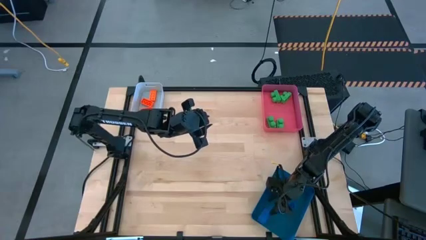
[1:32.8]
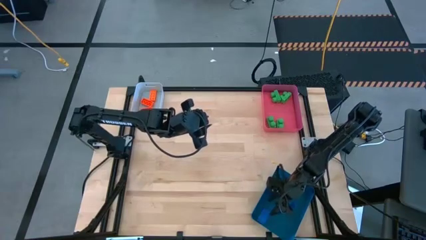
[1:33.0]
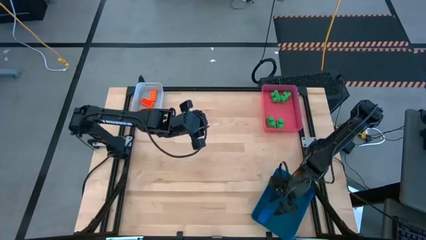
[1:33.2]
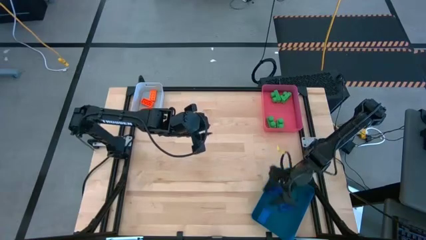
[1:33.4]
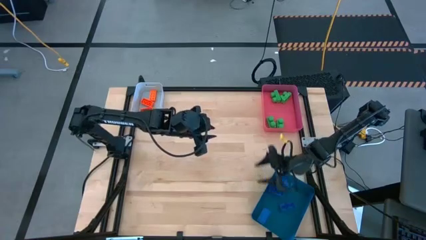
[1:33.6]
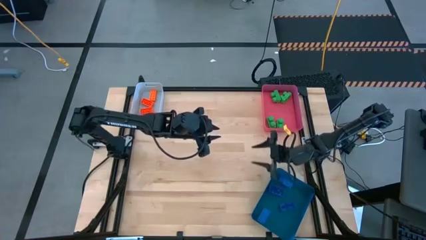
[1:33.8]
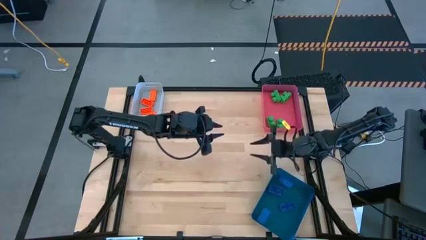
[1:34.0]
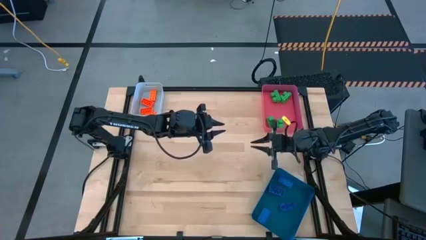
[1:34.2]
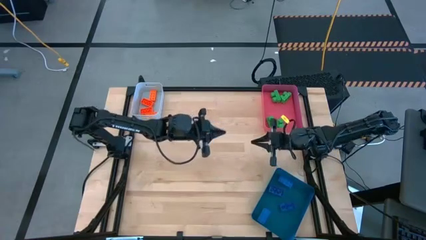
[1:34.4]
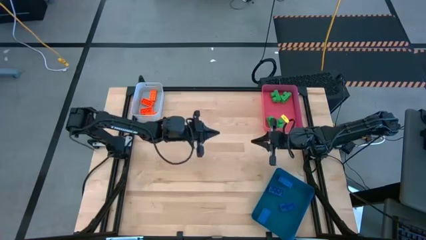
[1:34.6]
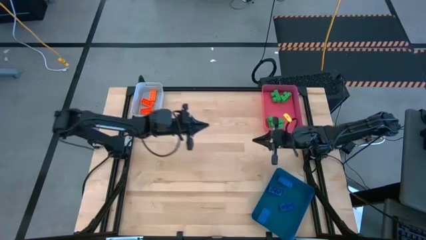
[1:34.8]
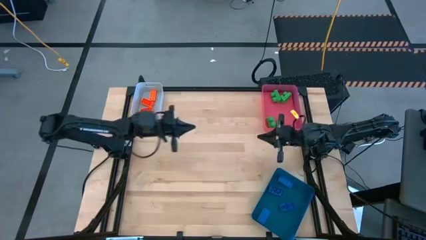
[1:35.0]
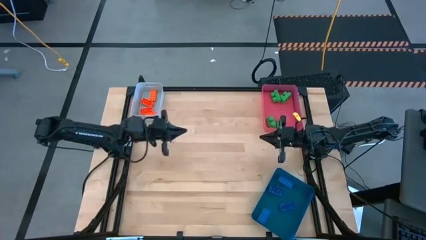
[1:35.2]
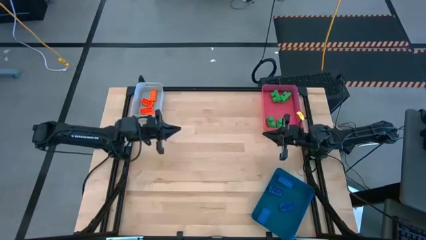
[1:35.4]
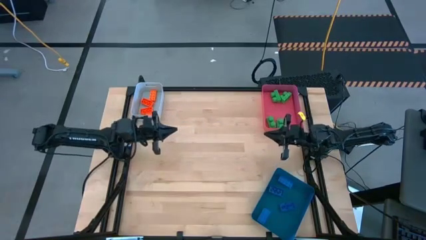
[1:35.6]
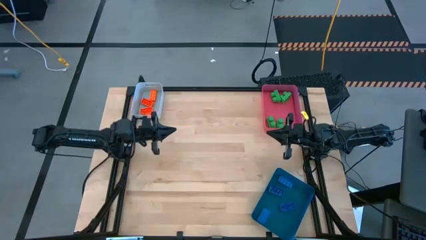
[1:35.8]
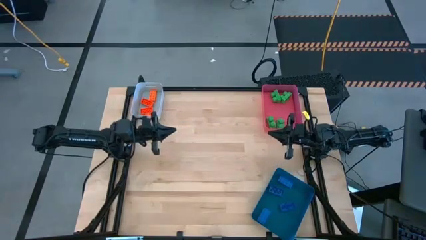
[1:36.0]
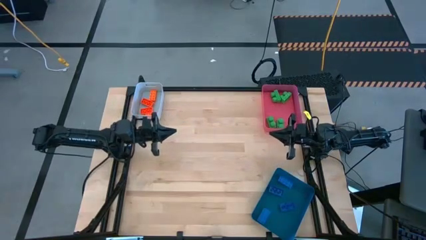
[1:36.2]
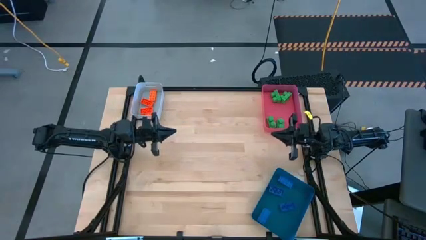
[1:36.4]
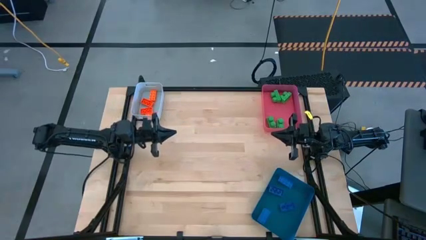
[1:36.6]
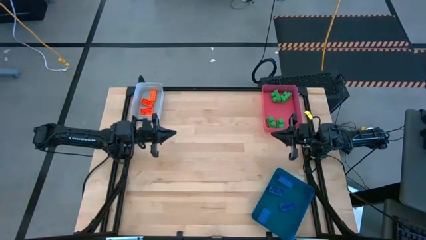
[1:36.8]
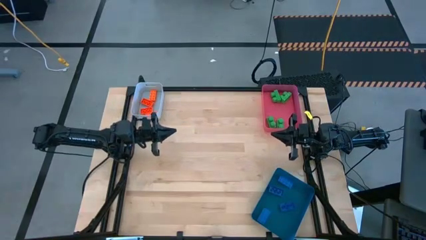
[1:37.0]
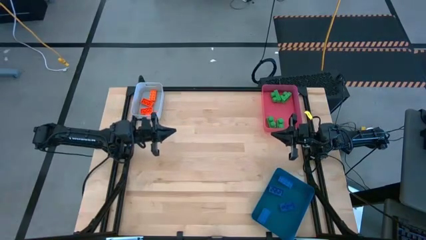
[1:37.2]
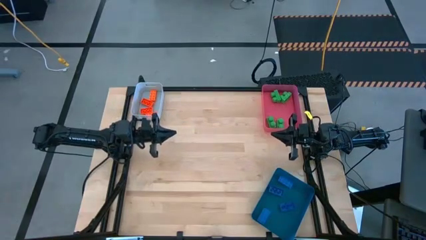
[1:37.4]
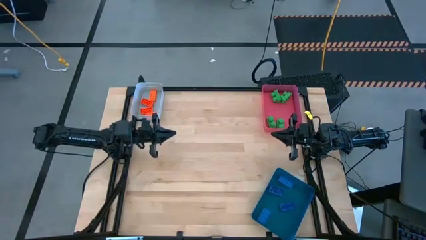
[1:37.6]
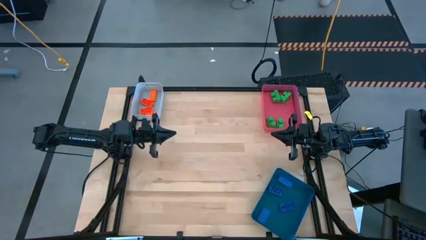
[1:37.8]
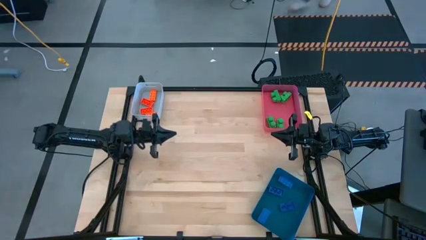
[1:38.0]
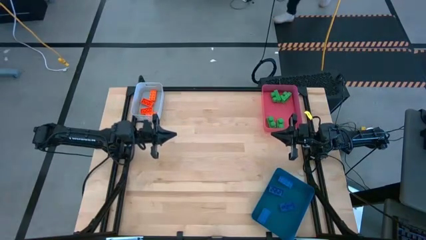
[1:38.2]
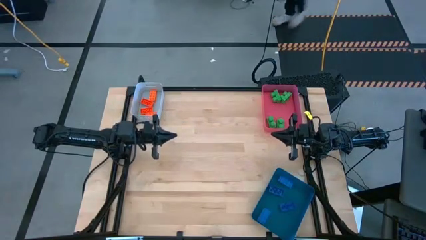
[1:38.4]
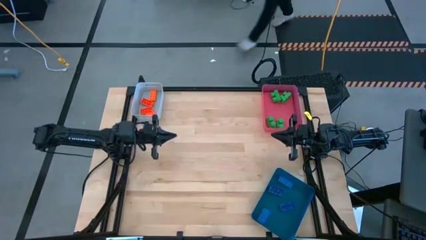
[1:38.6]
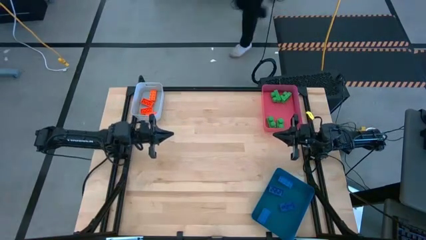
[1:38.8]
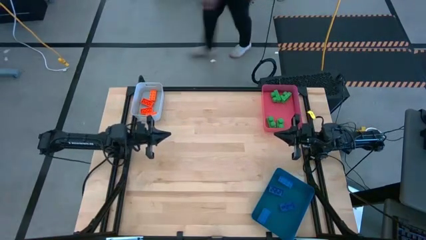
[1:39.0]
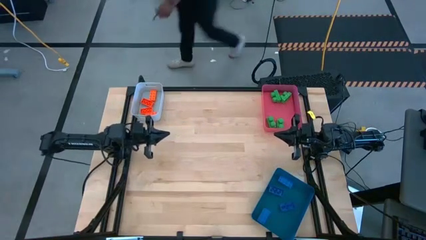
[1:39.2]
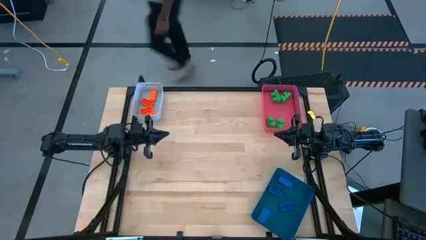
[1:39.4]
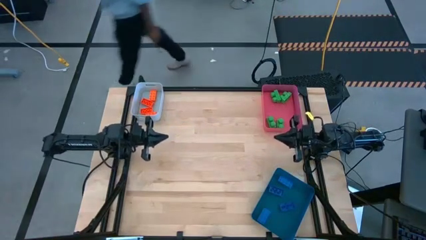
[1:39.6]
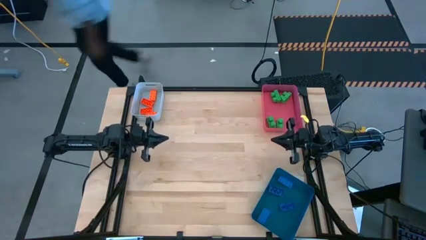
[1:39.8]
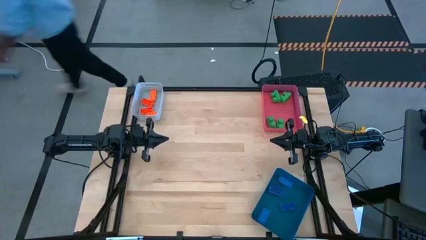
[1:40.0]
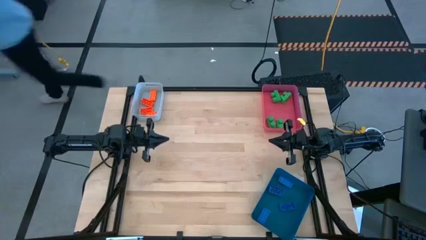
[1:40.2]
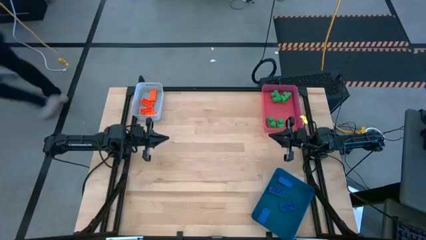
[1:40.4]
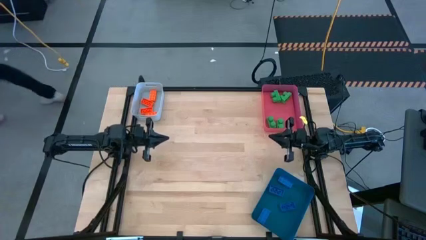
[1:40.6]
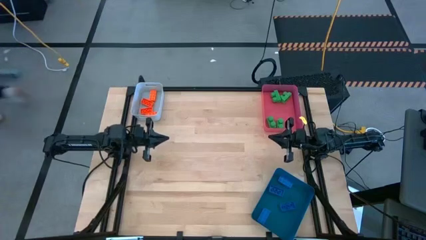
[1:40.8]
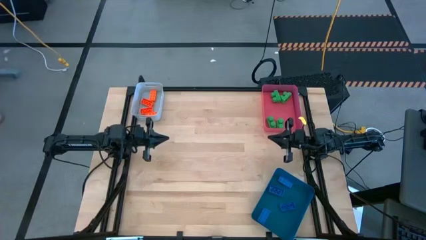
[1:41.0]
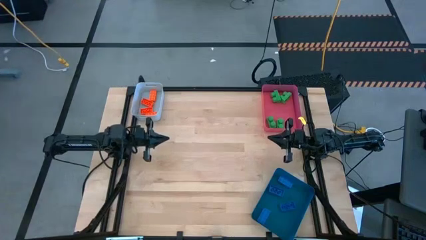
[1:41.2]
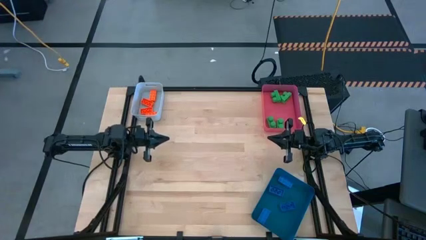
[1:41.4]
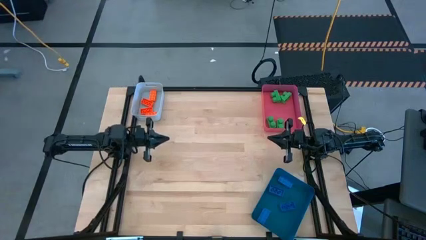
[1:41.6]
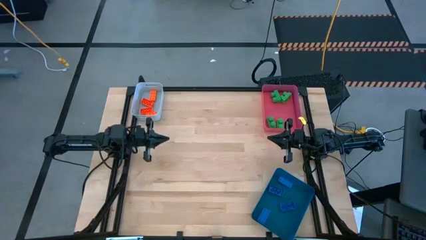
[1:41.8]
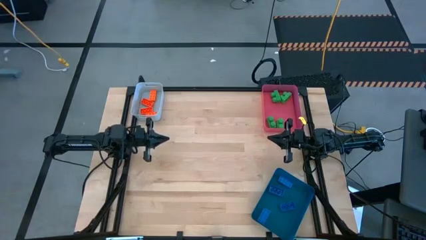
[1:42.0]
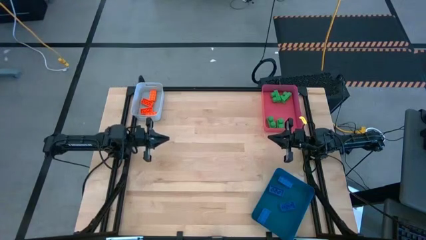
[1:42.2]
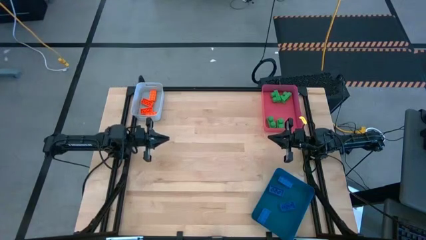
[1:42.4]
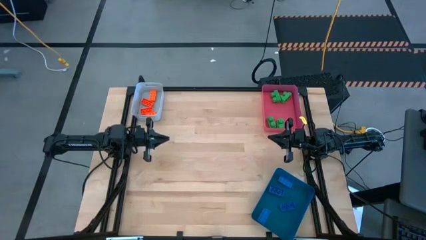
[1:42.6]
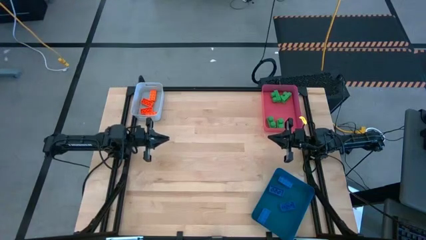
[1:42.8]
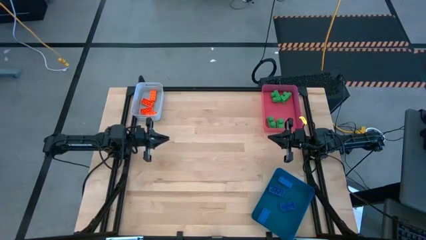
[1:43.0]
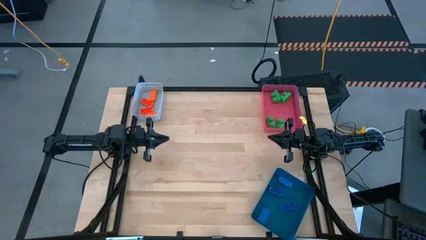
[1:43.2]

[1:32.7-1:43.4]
Task: Sort & place blocks by color
Return to Home Position

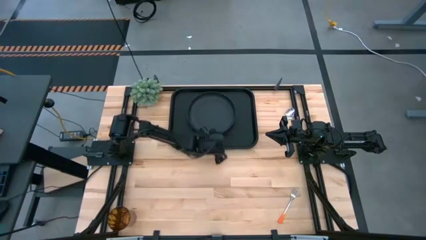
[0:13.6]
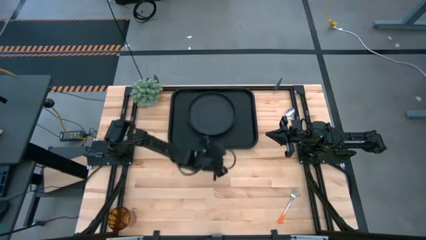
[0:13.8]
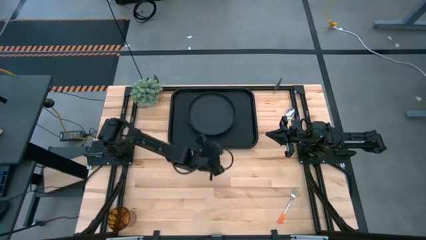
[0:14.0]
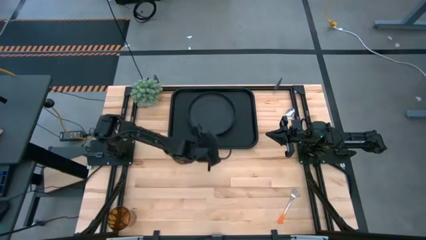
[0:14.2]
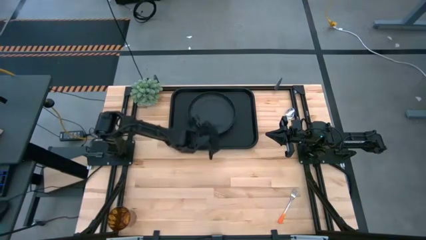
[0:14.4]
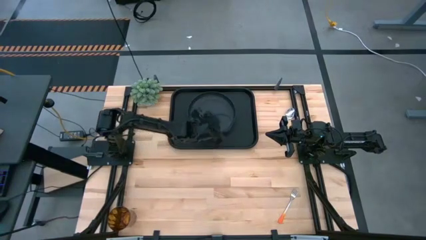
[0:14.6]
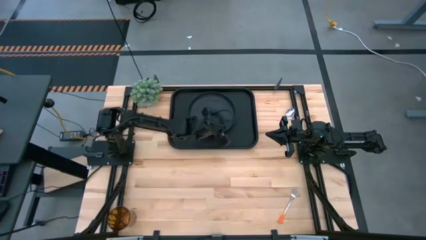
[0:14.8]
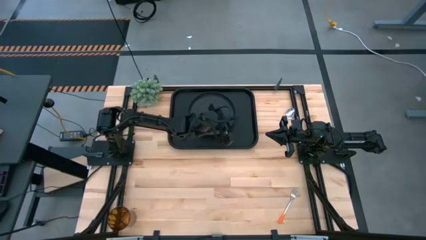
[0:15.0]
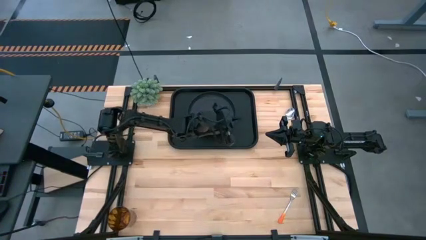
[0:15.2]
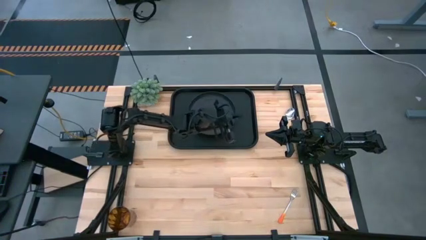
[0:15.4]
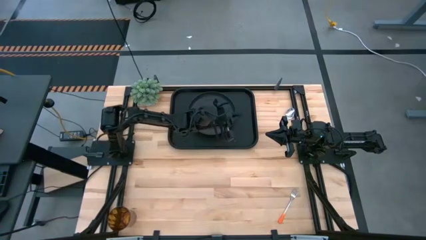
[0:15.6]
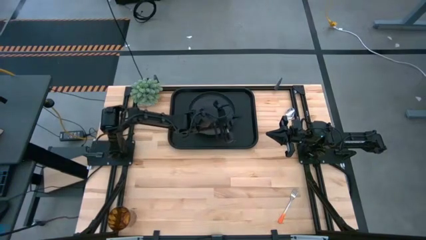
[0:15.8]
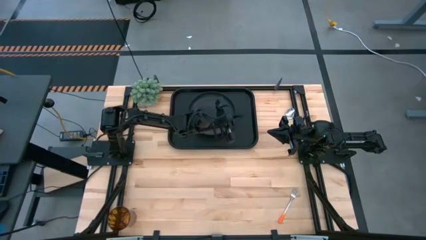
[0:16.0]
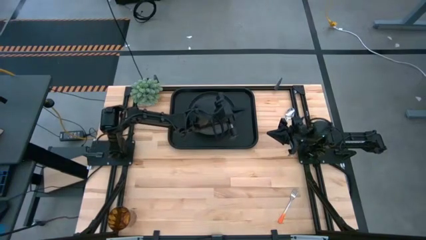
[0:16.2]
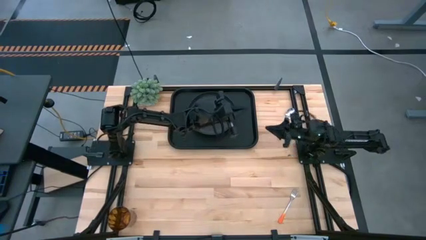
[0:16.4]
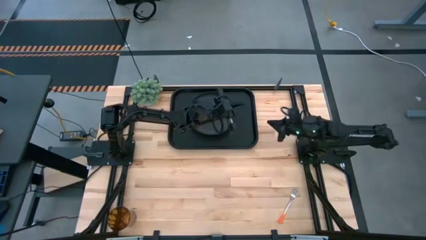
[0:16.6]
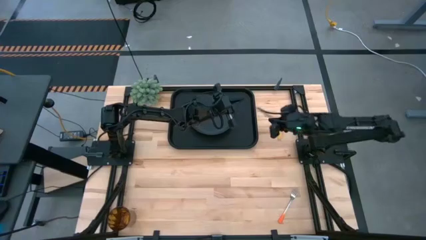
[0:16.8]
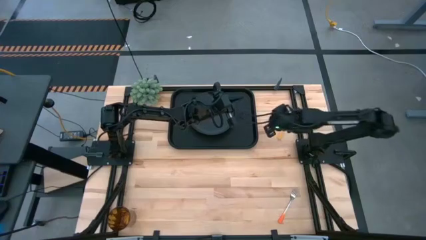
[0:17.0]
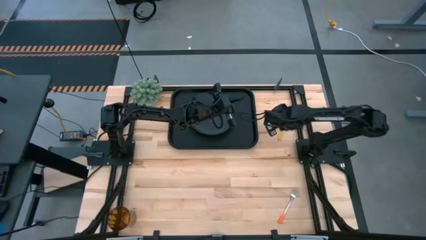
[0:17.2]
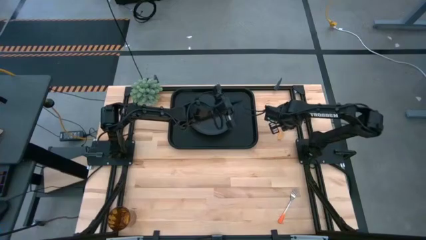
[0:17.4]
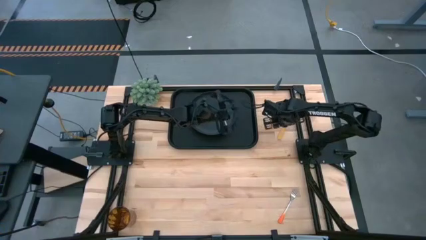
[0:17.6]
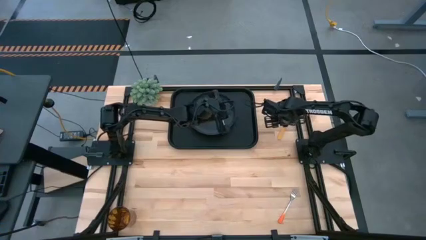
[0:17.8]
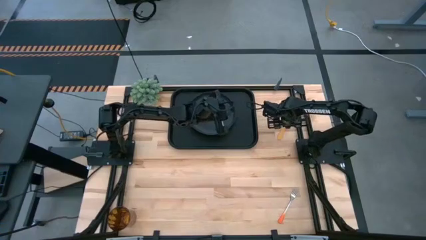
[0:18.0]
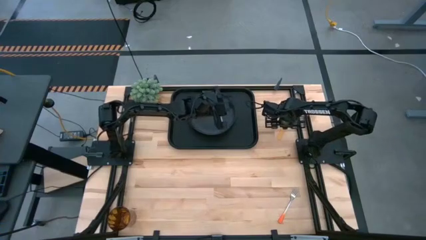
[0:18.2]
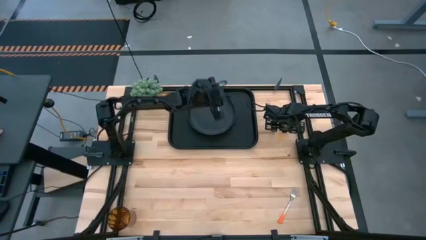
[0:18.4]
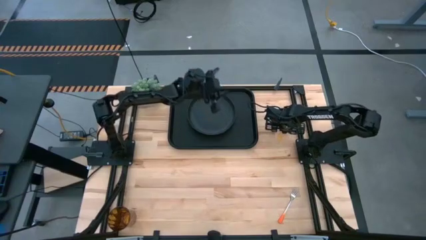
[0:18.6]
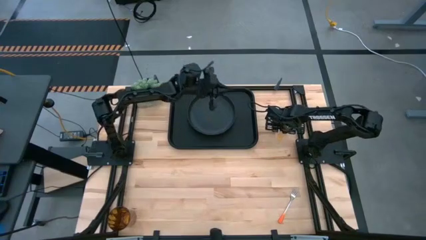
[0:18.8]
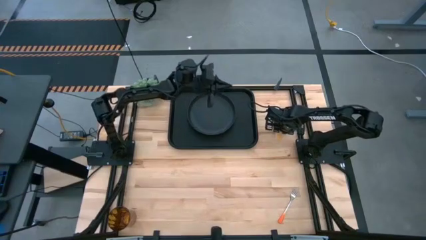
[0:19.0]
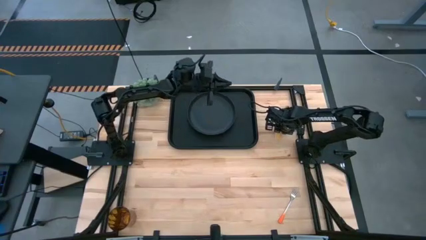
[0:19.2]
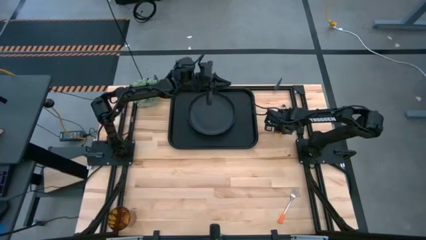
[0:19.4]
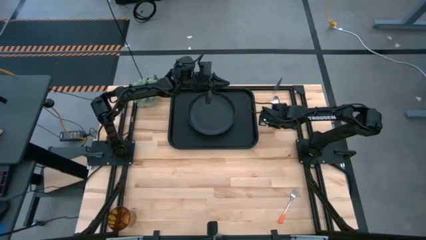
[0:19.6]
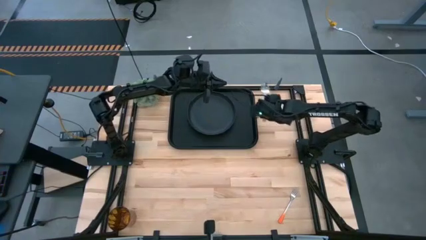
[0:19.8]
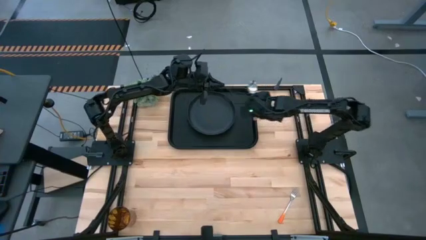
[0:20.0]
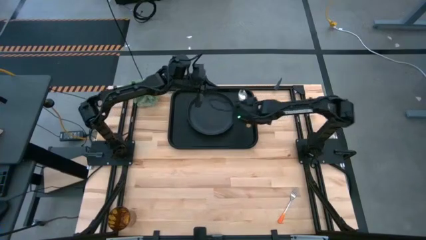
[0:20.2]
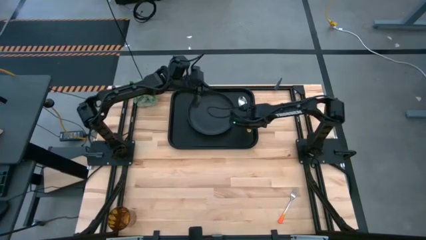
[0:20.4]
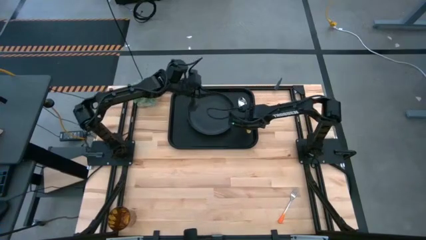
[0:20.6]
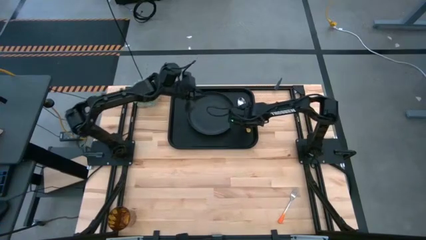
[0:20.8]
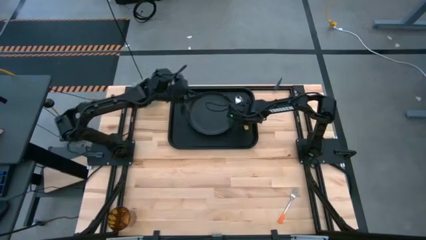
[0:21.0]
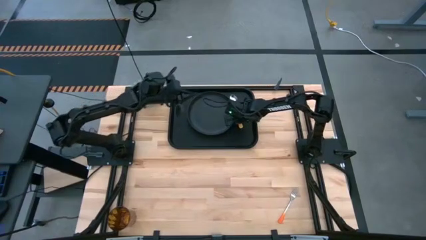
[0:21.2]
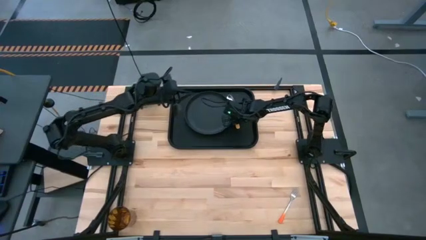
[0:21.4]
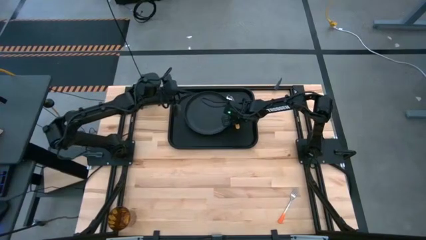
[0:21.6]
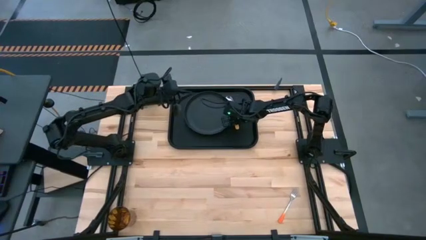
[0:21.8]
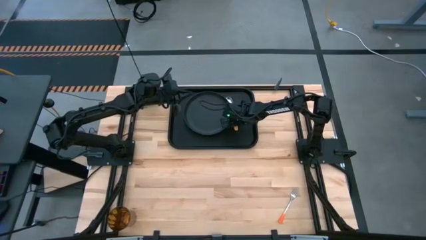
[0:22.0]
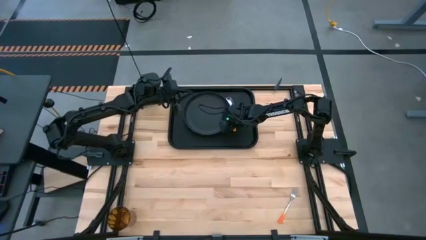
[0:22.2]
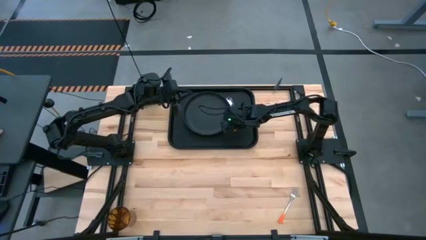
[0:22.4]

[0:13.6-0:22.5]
Task: Pick and place plate/cup/fork/spoon on tray
Put the yellow spoon beside the black plate on the black serving tray
